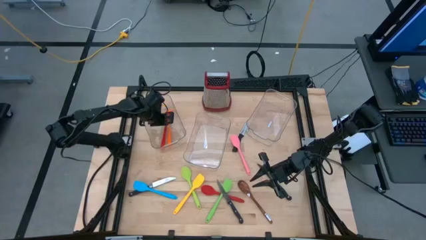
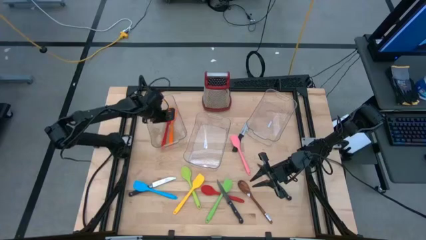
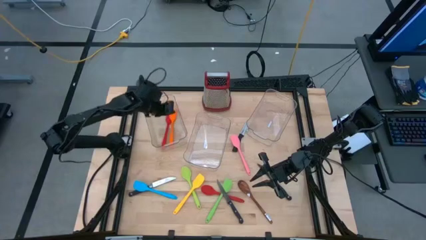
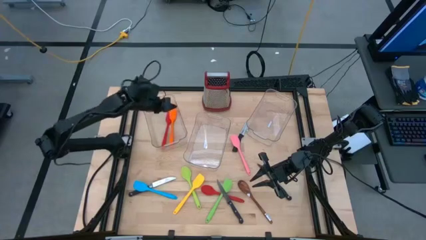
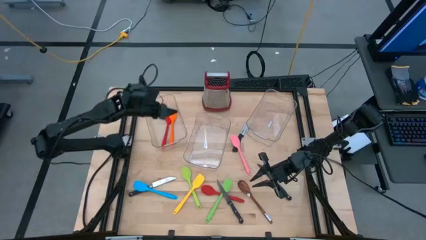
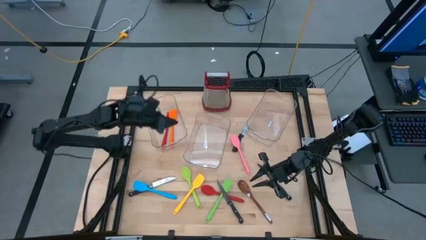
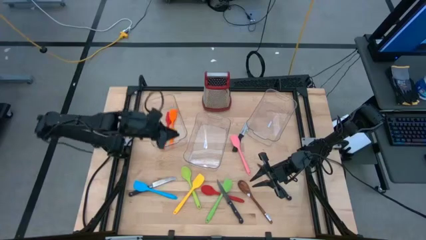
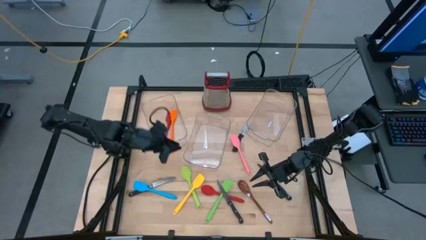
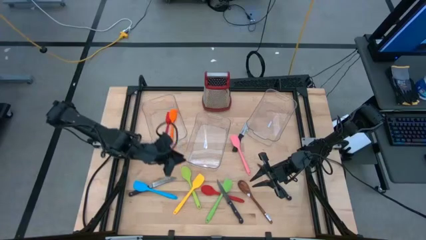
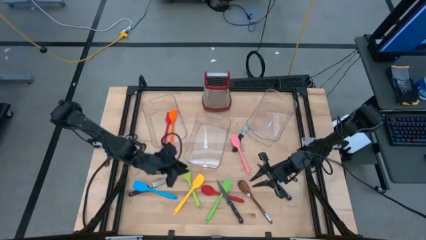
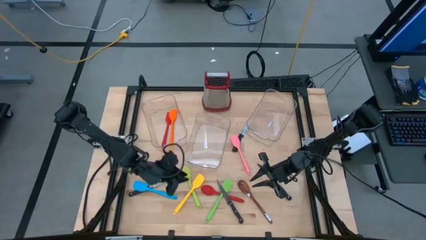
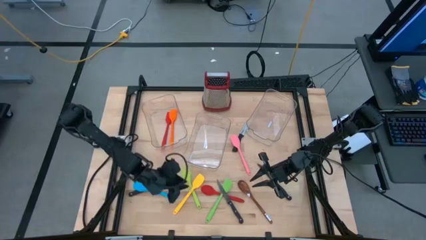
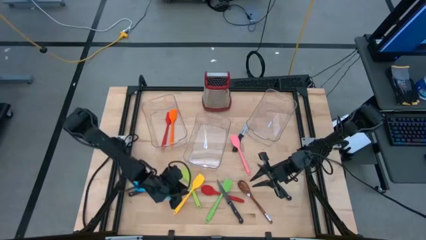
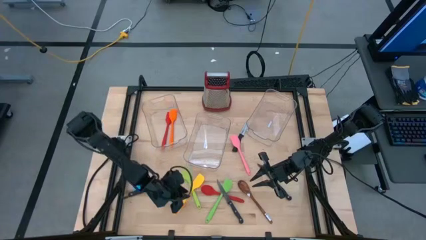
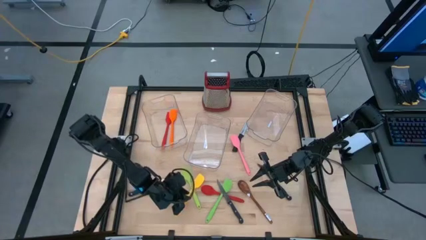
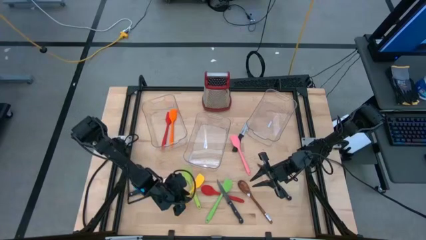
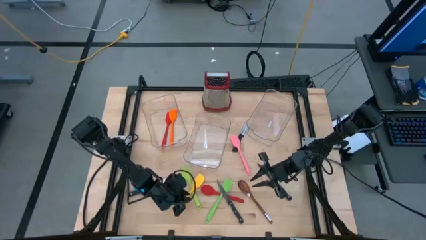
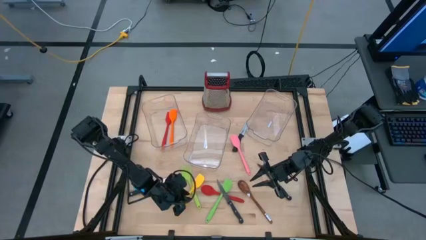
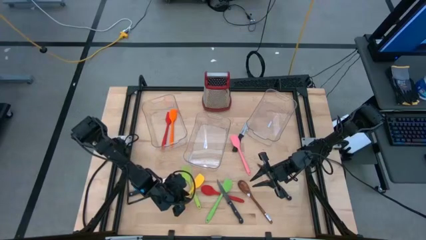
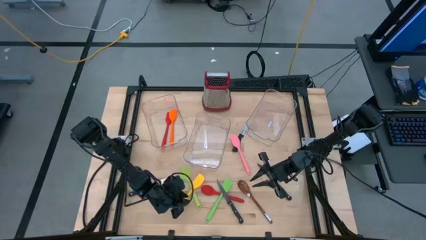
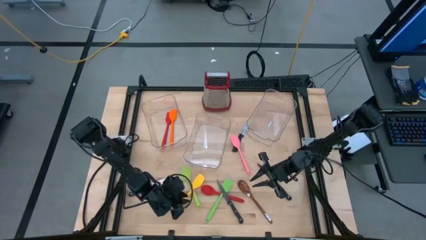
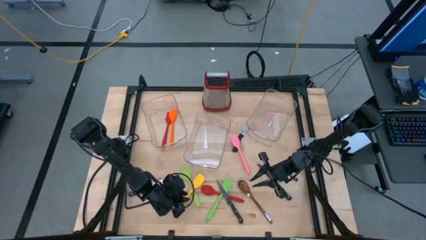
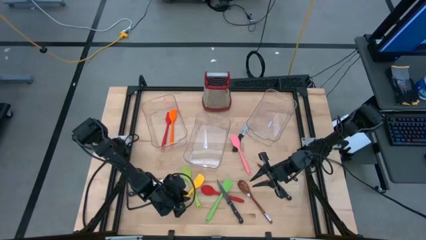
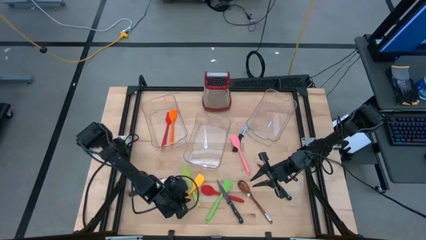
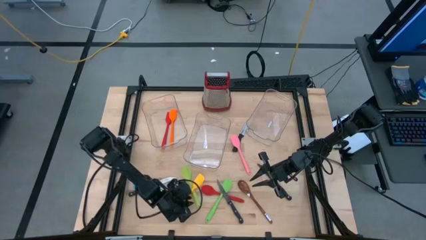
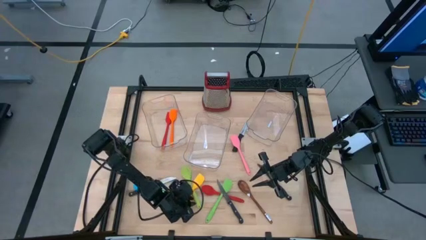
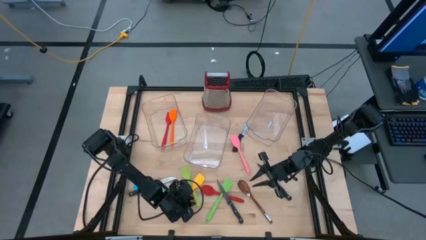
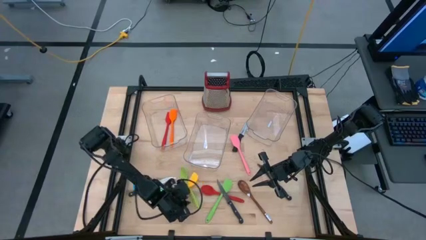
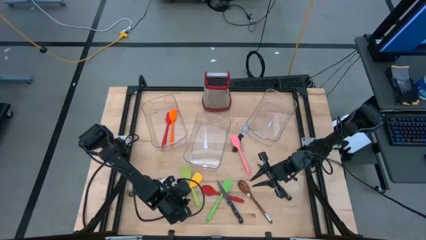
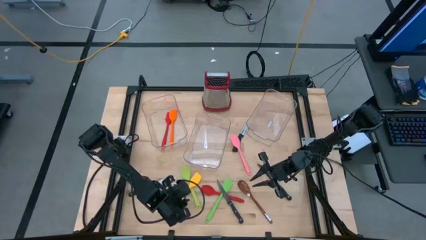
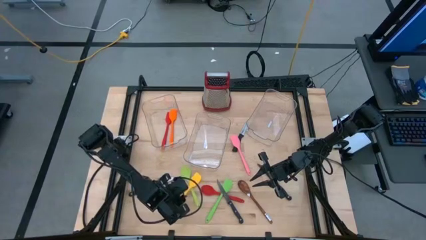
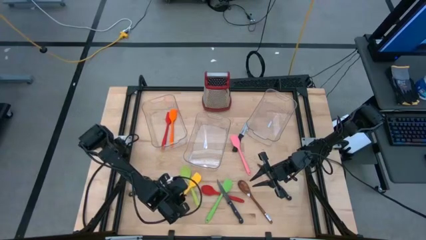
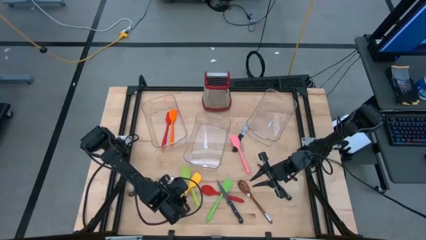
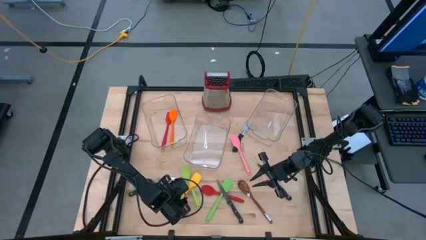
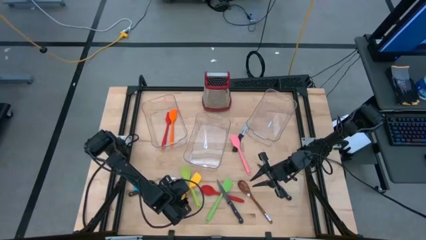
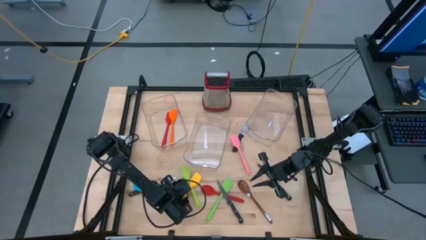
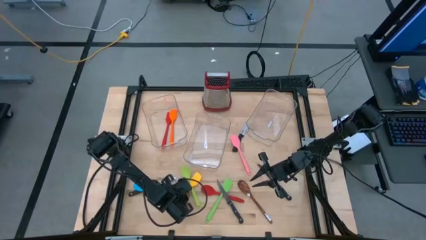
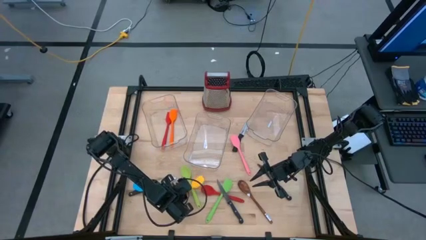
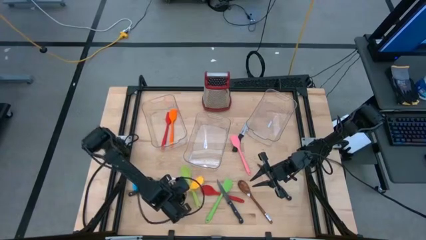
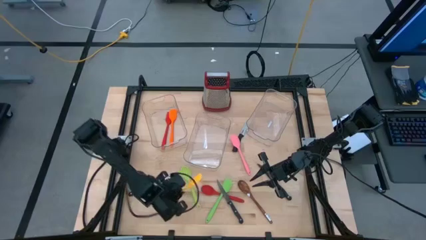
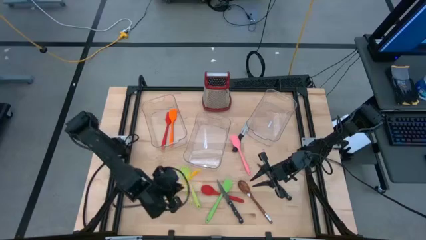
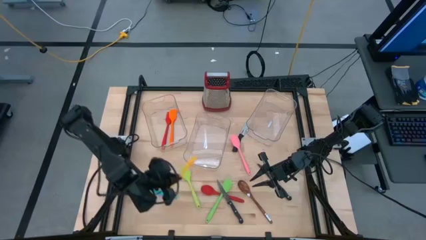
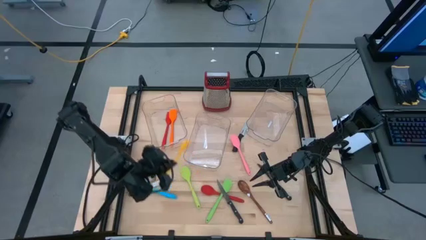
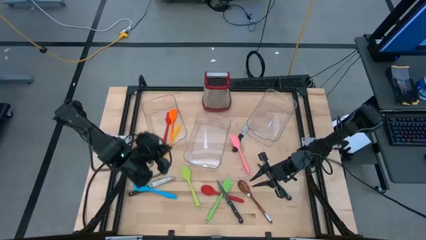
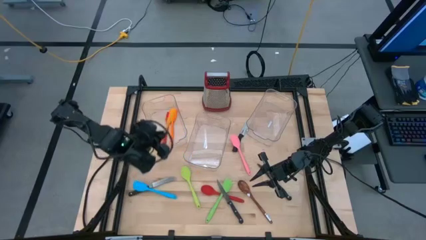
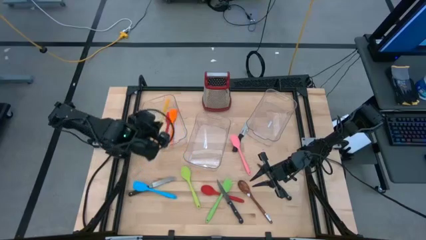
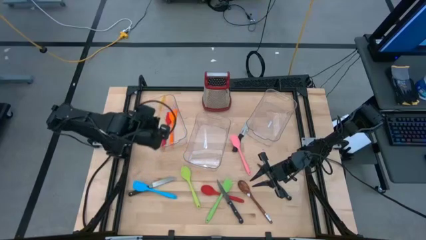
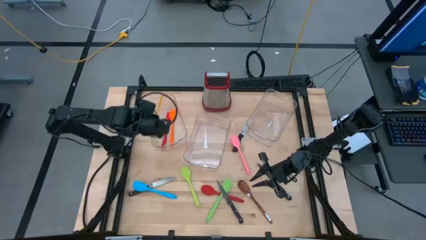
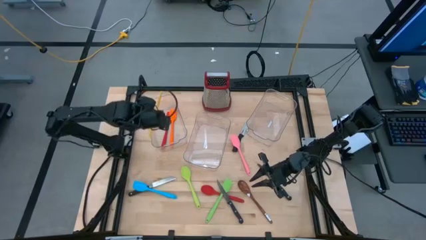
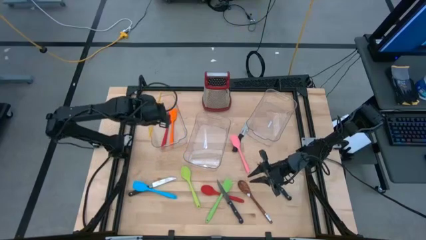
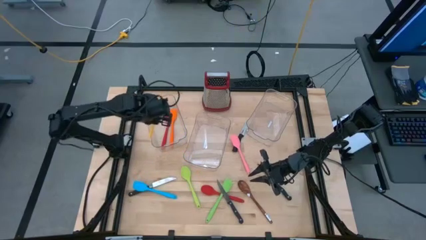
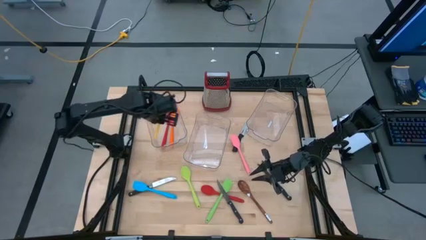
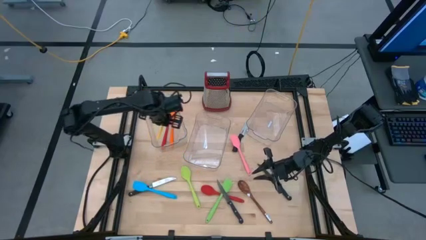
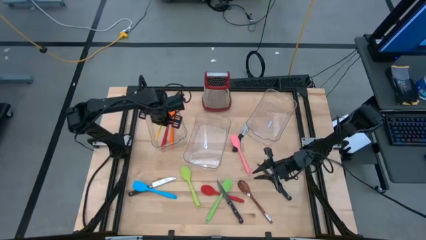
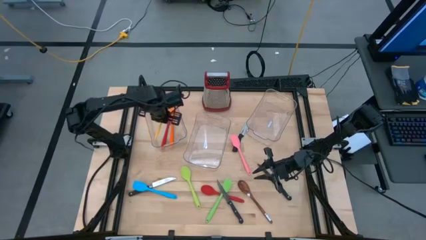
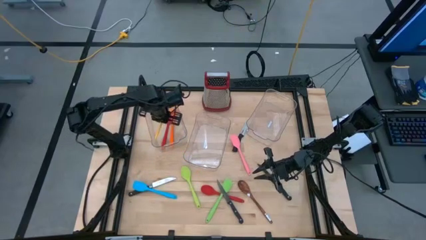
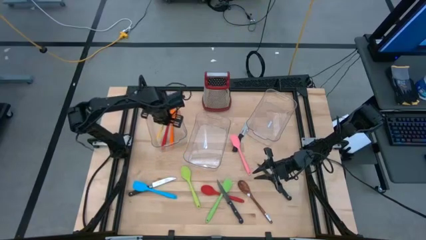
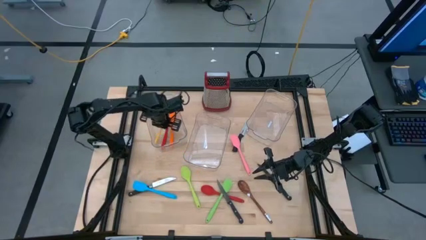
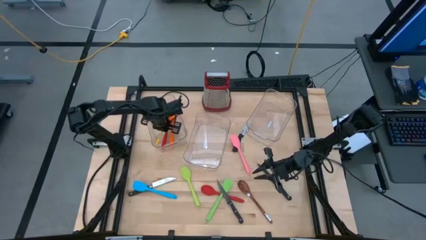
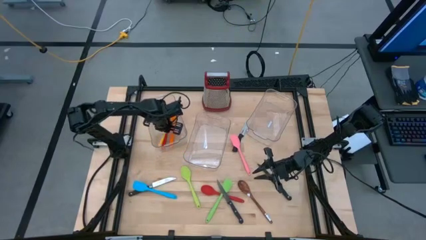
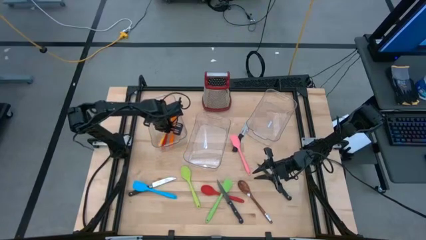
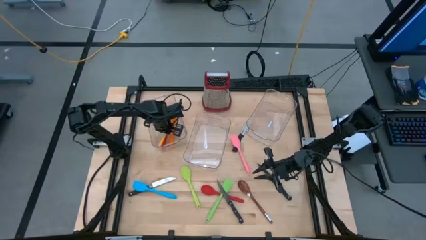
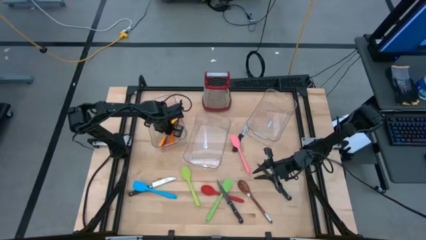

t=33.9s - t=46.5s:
Task: Pick & Place Kitchen Items
Put the yellow spatula into the left transparent bin
